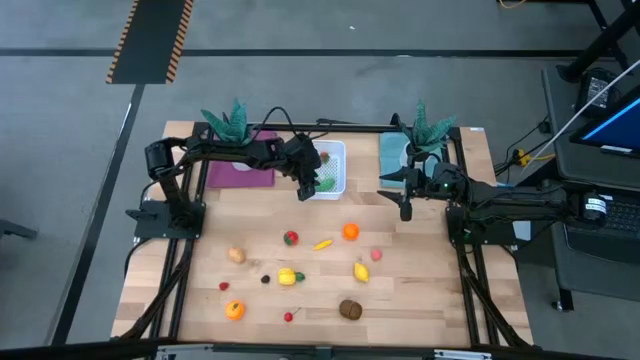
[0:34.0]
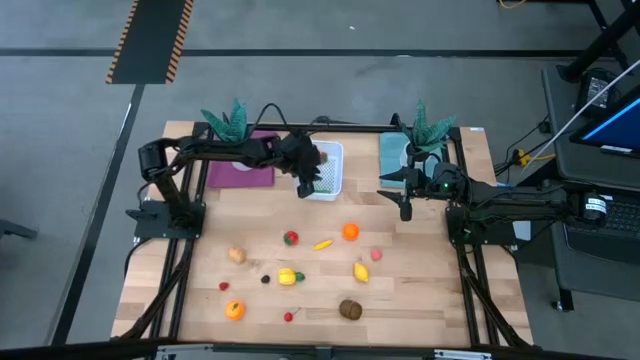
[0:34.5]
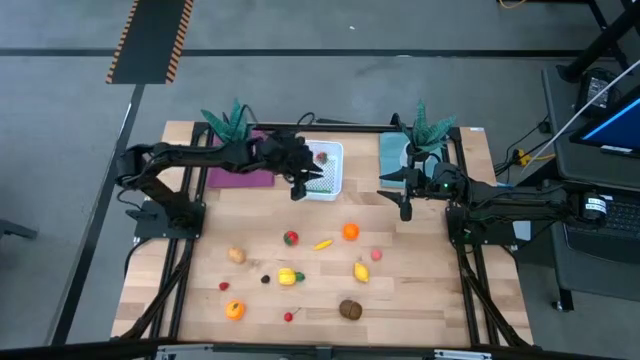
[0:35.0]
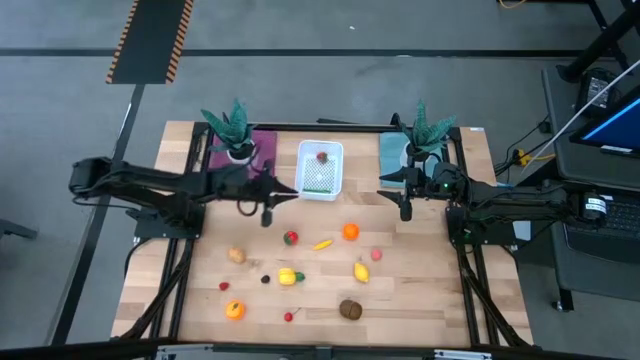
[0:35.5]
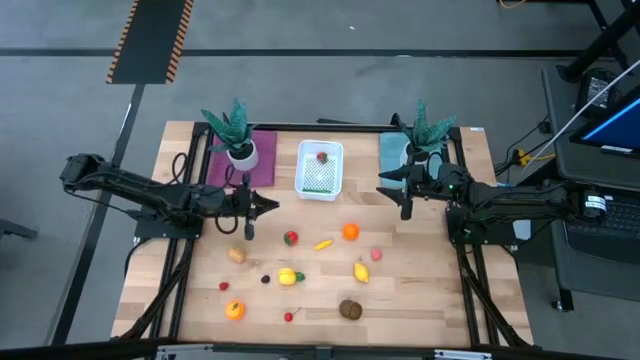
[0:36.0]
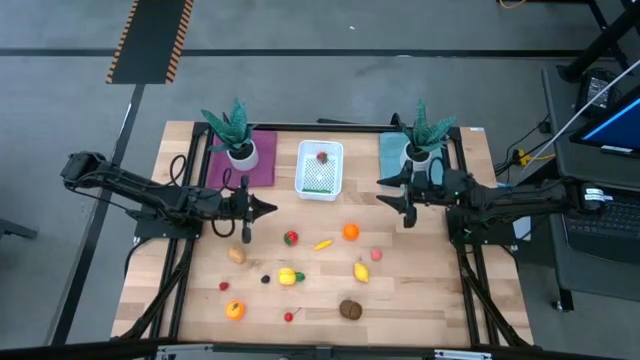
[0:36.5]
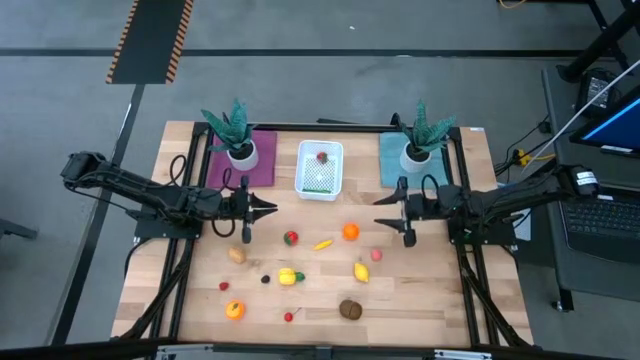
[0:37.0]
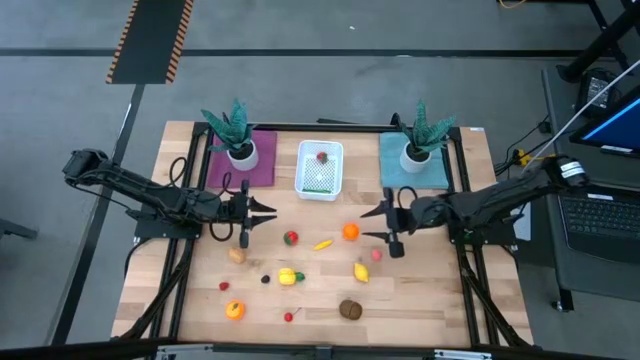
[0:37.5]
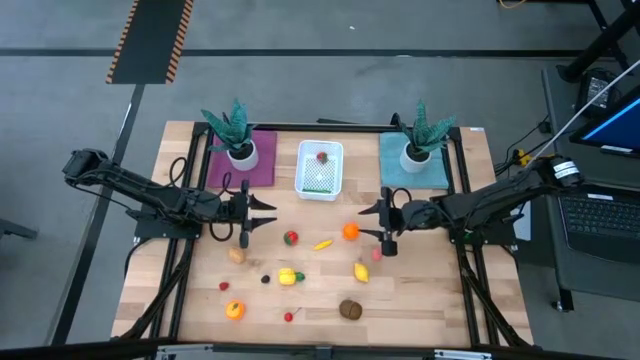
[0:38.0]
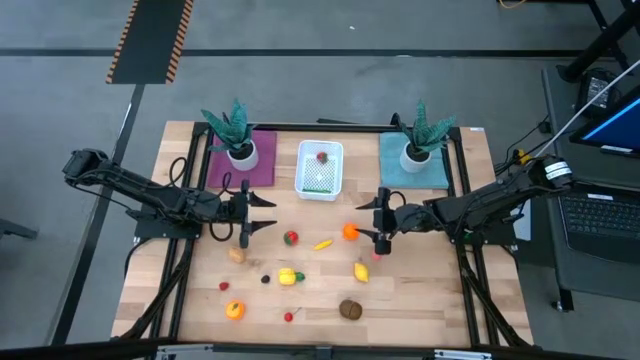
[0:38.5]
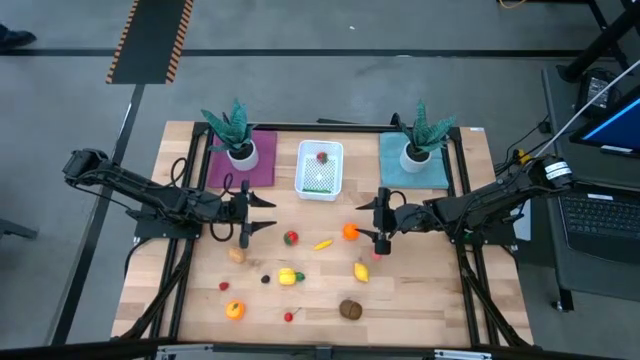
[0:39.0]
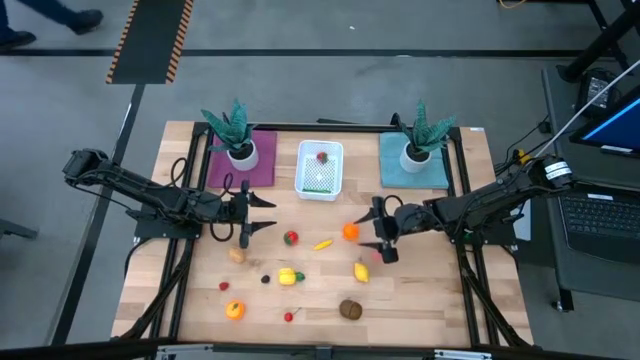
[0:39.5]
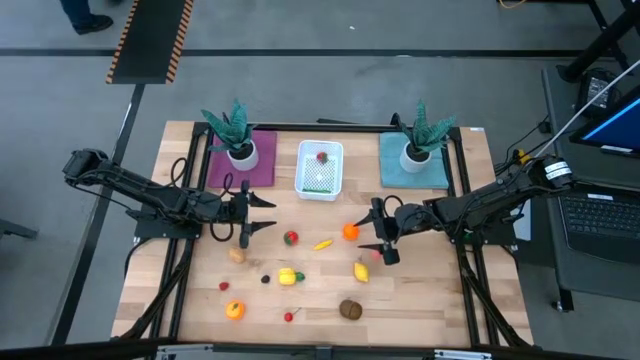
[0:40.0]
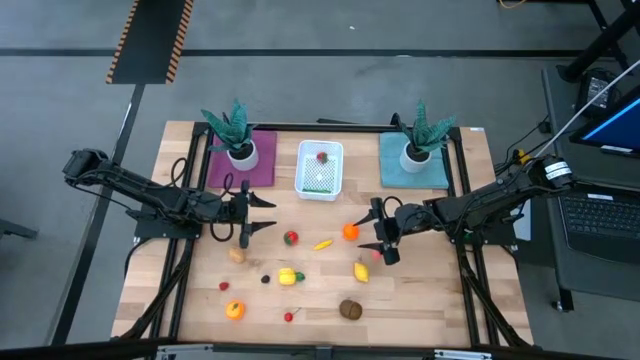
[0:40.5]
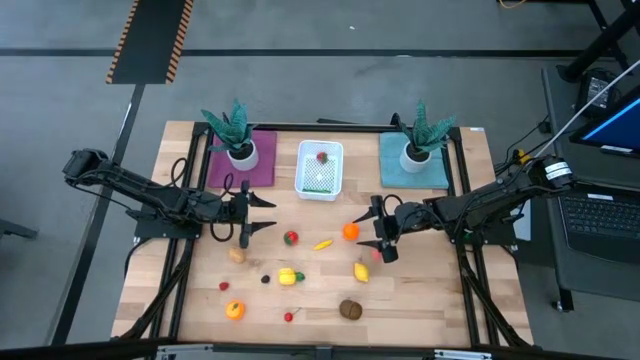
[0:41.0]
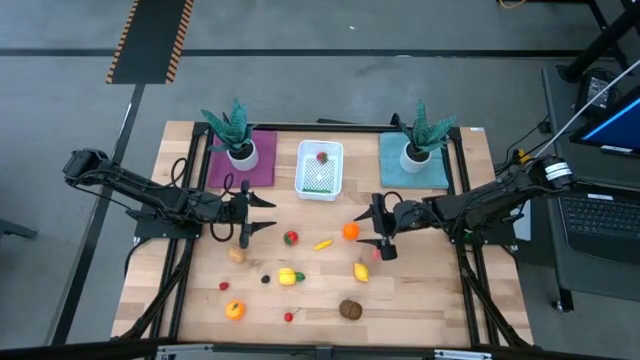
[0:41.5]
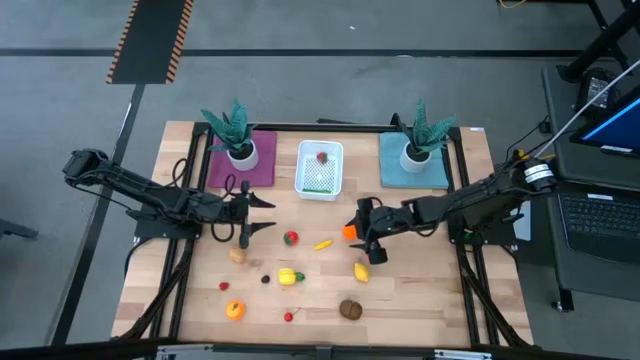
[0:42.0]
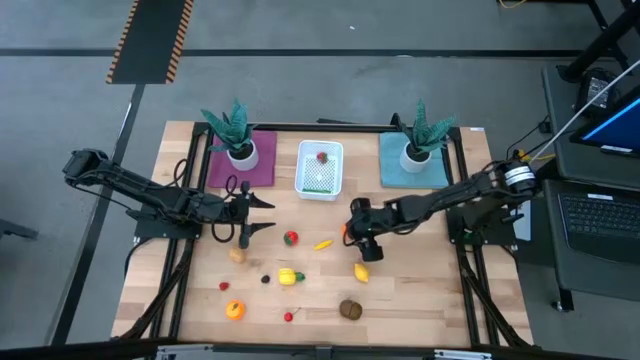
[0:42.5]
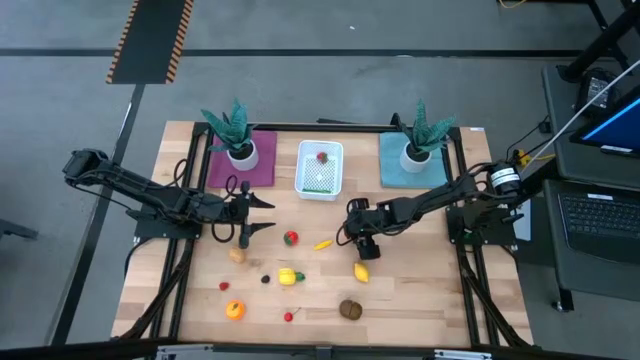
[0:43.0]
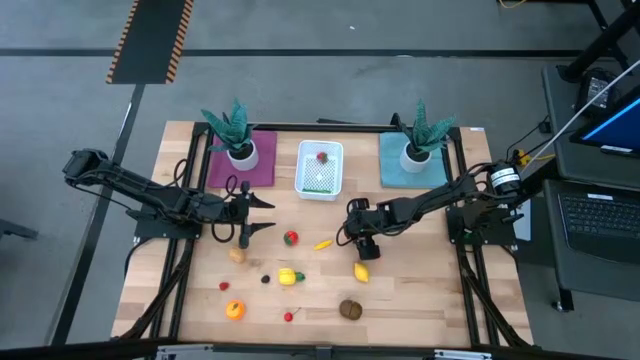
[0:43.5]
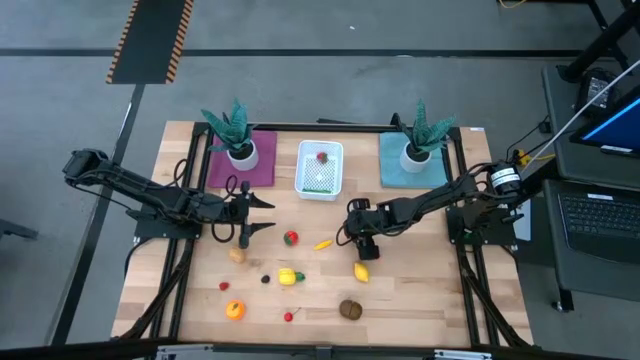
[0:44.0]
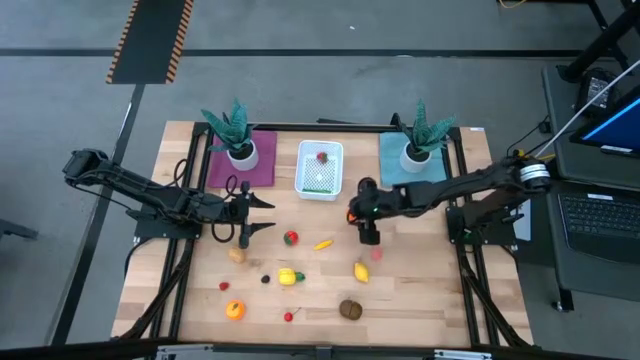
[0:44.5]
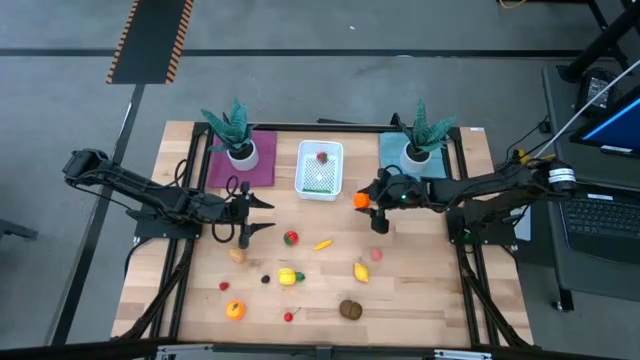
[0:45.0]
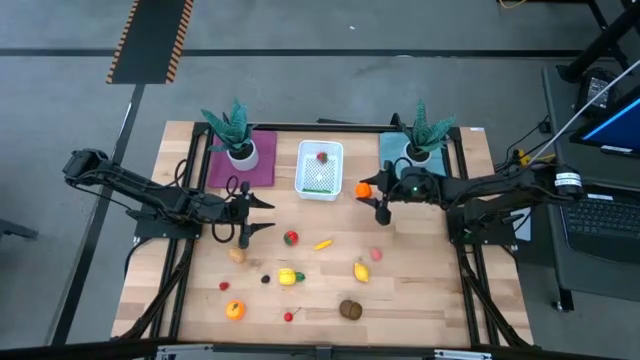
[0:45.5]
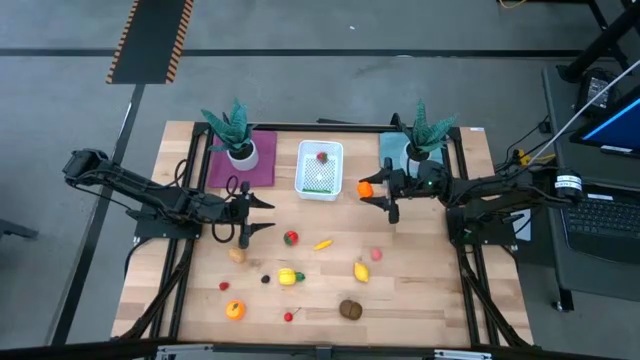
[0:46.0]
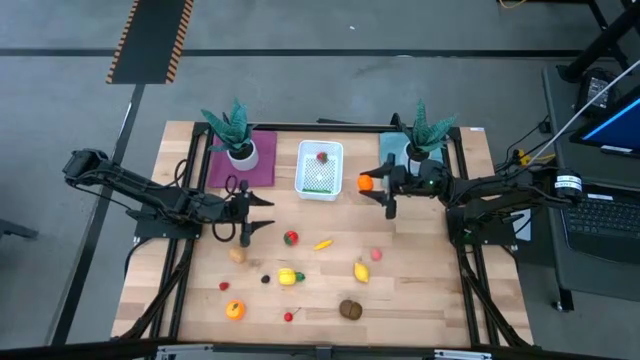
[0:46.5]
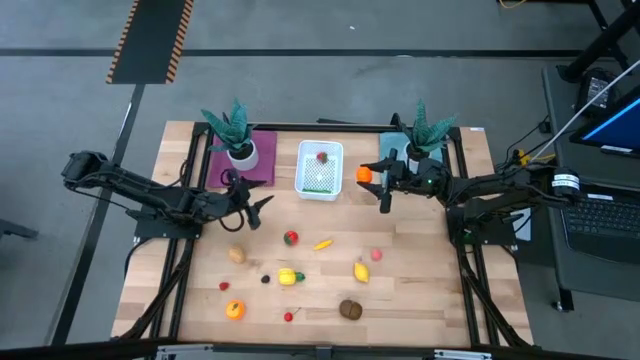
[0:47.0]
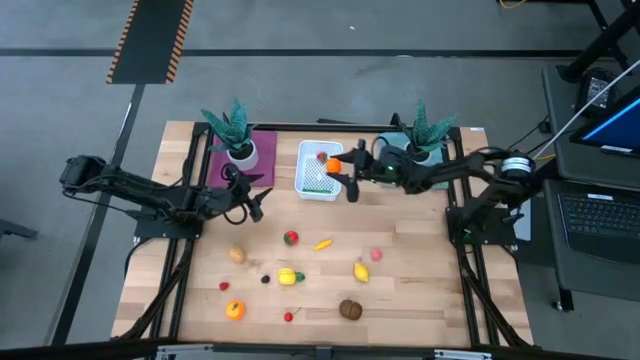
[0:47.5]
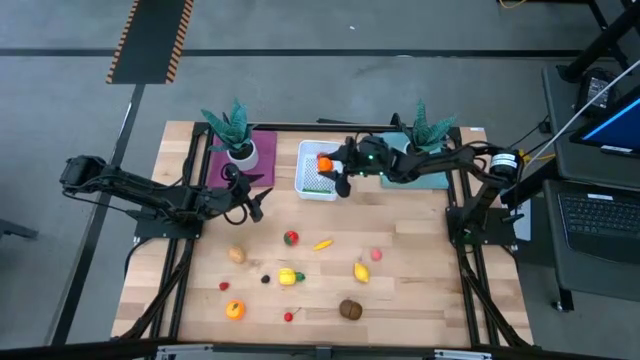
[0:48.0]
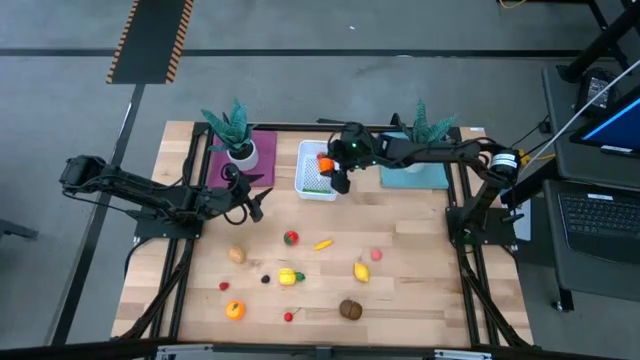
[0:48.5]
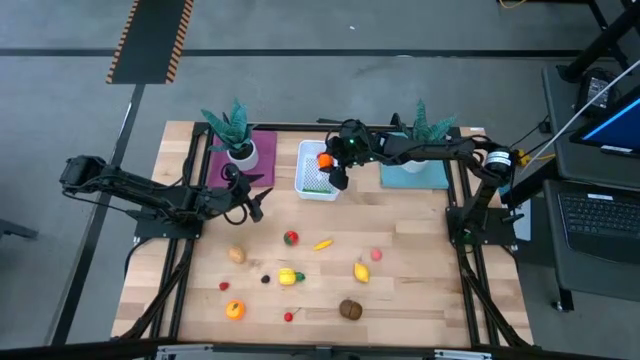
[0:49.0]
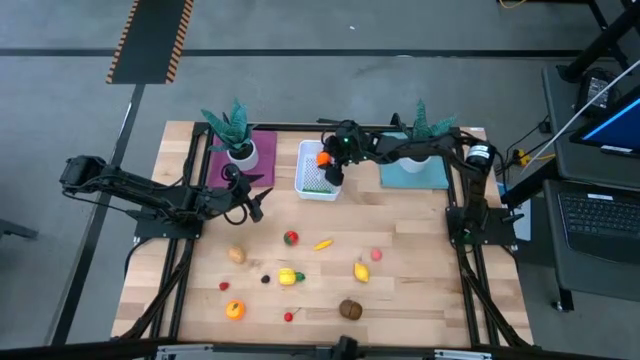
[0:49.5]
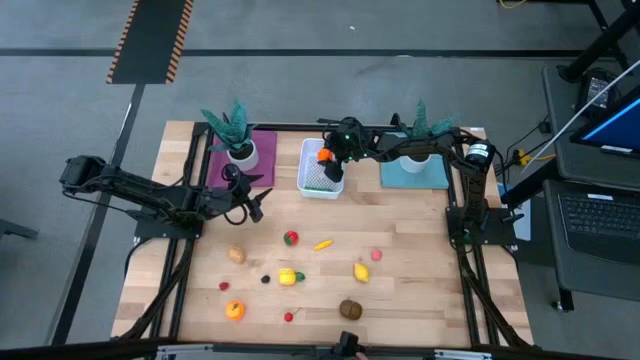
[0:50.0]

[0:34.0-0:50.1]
Task: Pick and placing Produce into tupperware
Put the orange pumpkin into the white bin

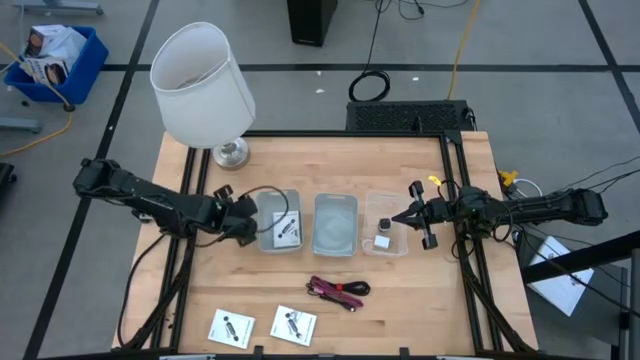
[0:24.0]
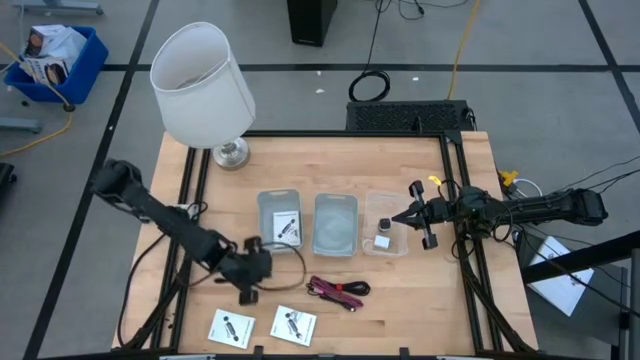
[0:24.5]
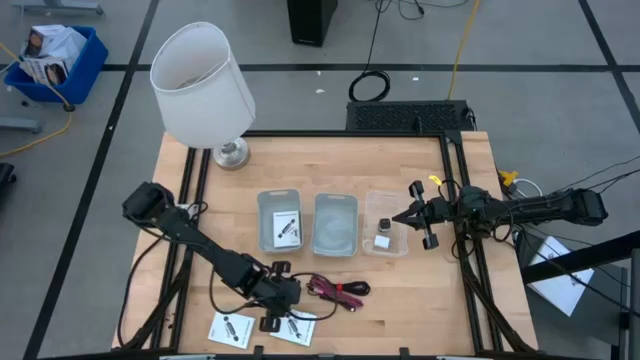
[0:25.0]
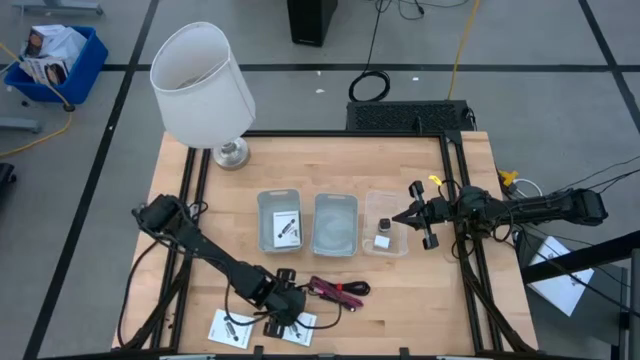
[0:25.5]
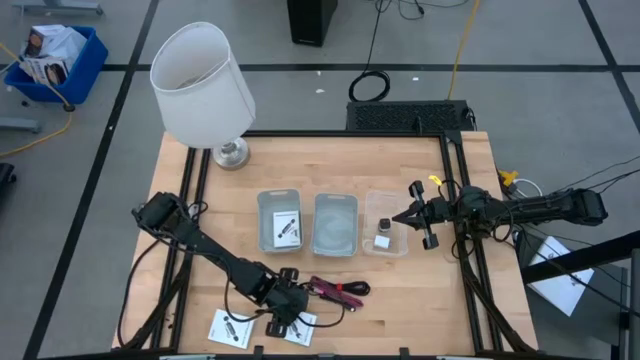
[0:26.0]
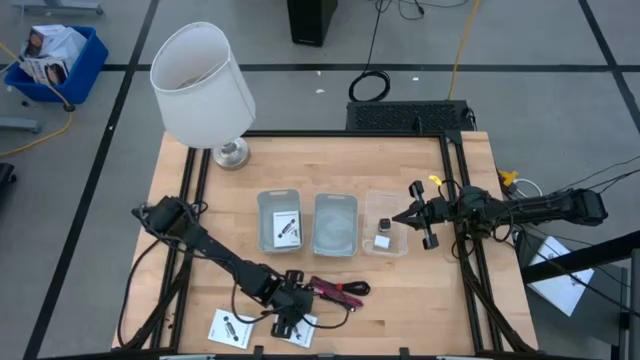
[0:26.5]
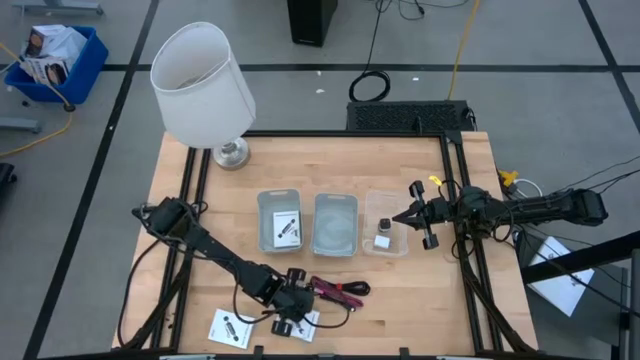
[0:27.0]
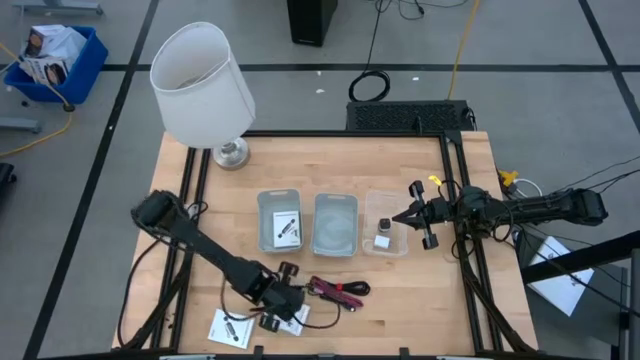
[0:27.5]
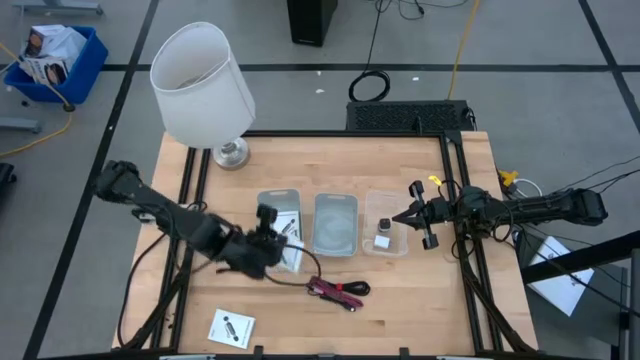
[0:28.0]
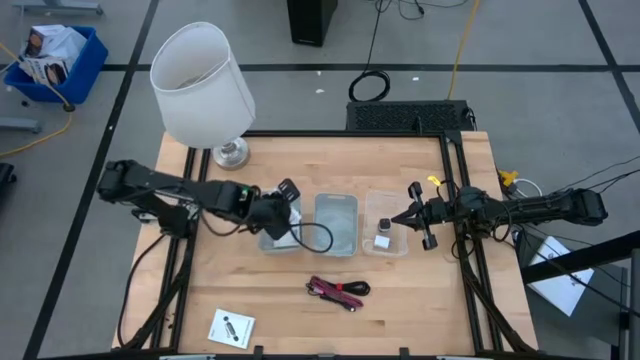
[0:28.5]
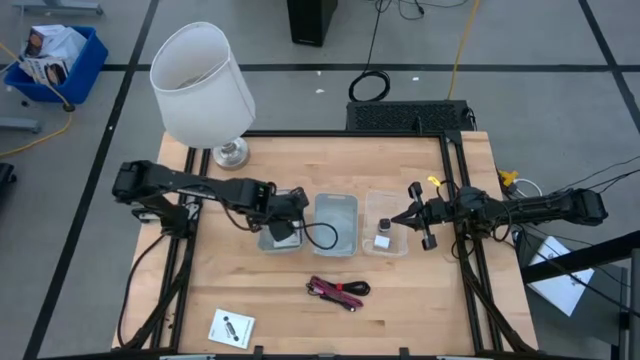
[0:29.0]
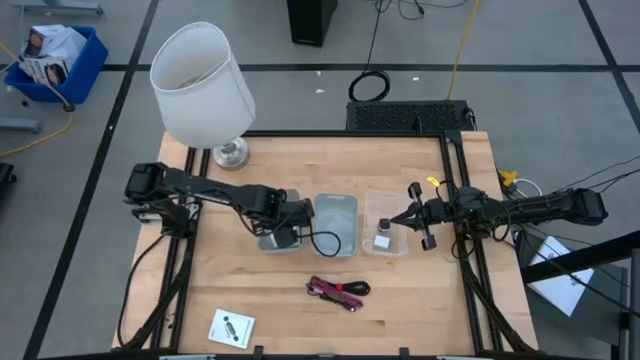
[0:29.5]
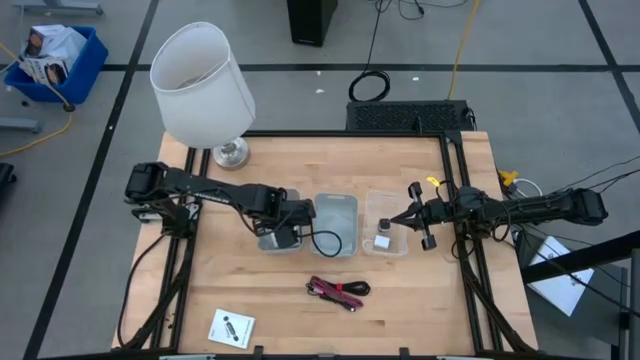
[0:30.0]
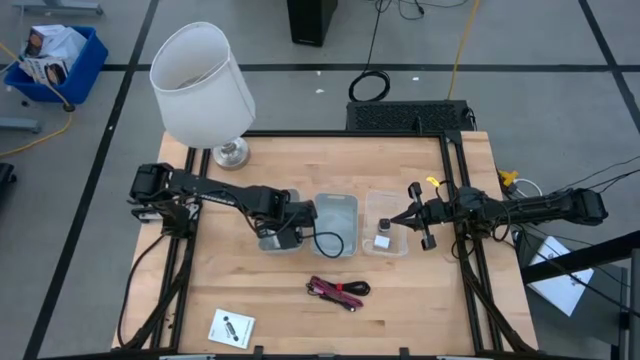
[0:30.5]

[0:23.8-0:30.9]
Task: Pick and place items into bin
Put the right card reader box into the left gray bin
